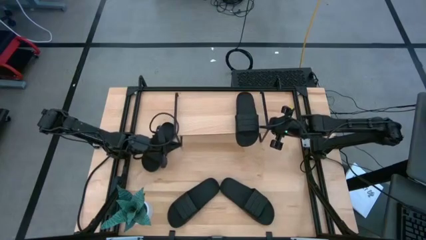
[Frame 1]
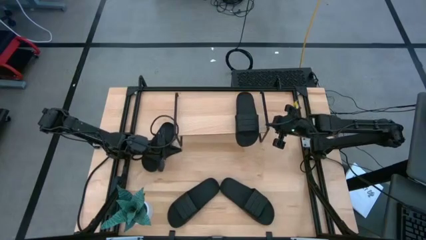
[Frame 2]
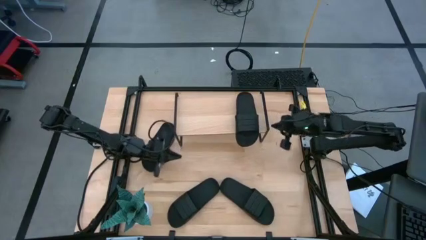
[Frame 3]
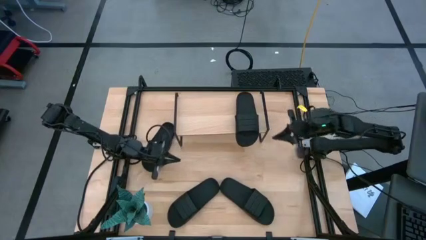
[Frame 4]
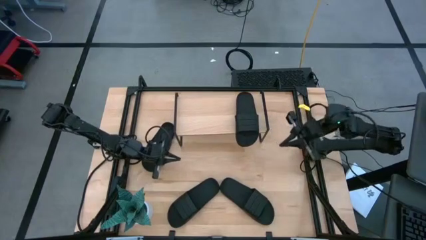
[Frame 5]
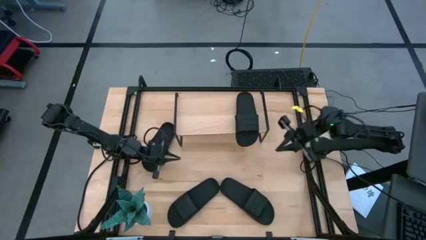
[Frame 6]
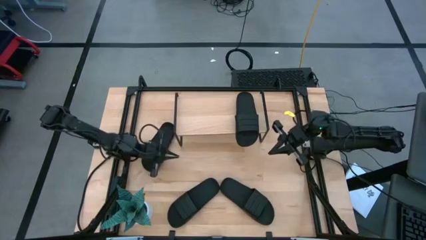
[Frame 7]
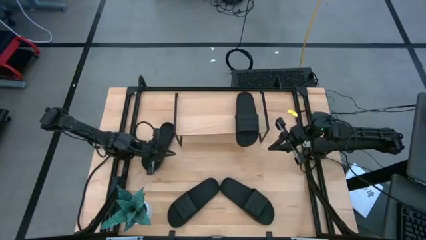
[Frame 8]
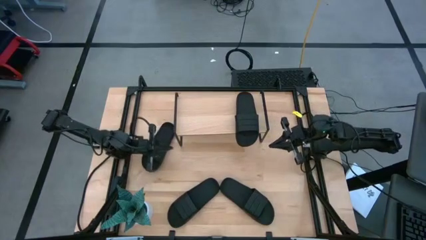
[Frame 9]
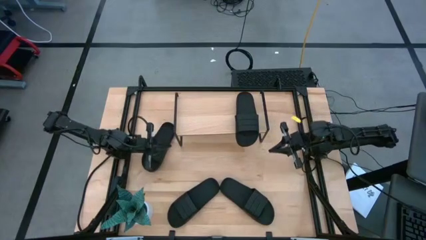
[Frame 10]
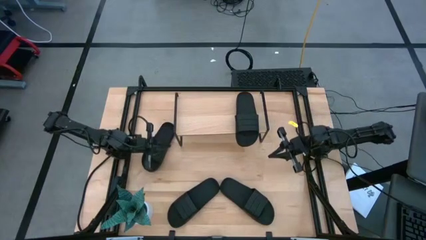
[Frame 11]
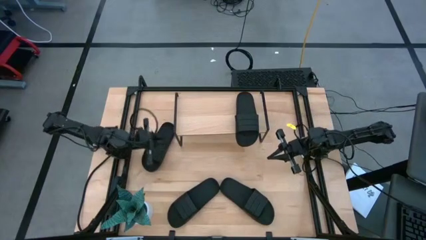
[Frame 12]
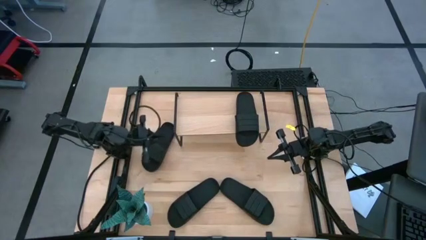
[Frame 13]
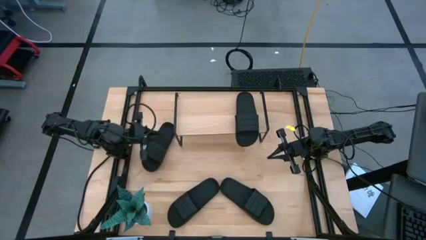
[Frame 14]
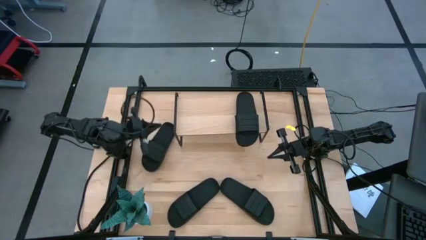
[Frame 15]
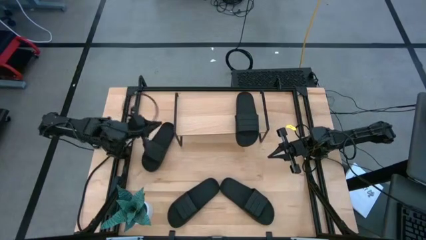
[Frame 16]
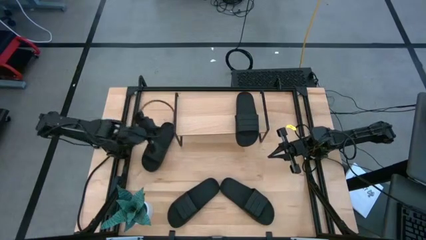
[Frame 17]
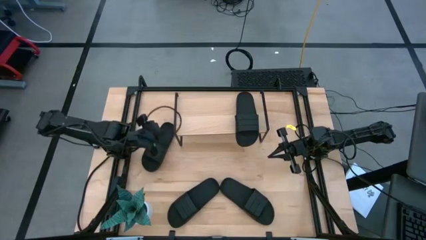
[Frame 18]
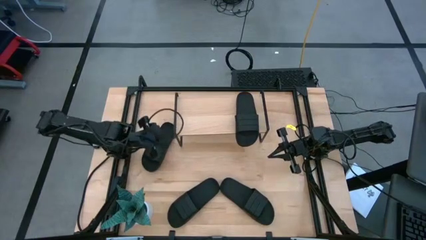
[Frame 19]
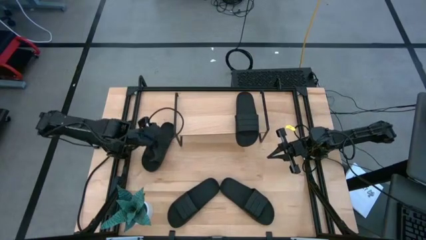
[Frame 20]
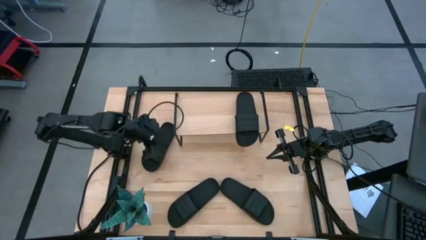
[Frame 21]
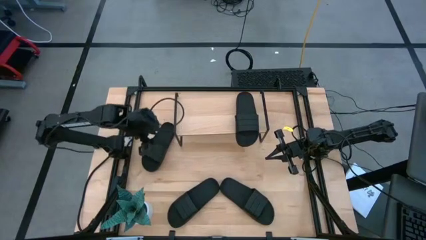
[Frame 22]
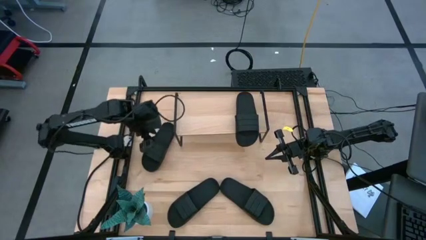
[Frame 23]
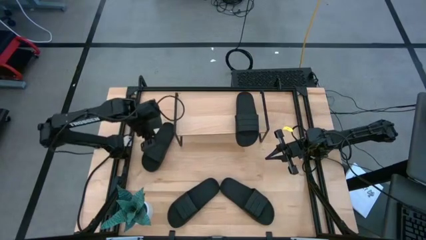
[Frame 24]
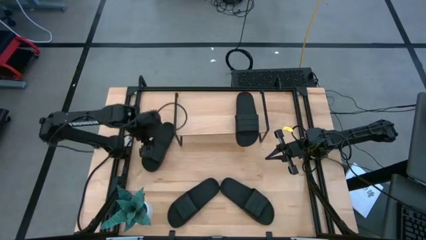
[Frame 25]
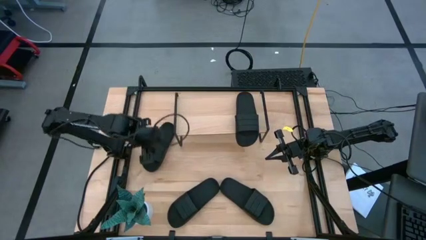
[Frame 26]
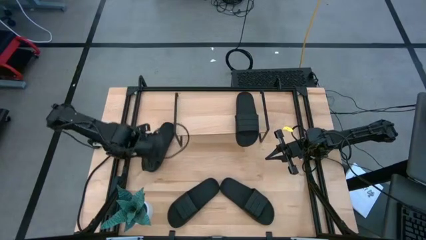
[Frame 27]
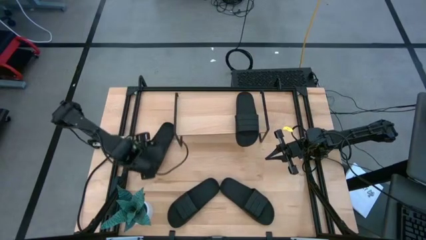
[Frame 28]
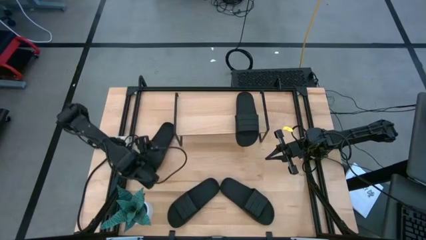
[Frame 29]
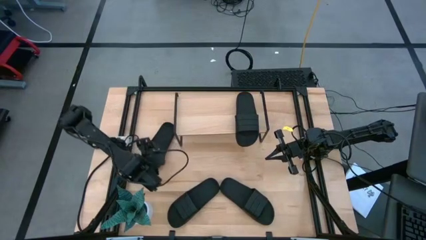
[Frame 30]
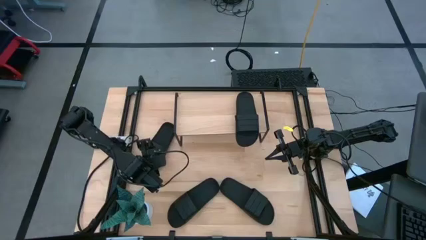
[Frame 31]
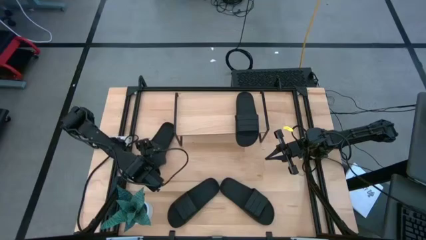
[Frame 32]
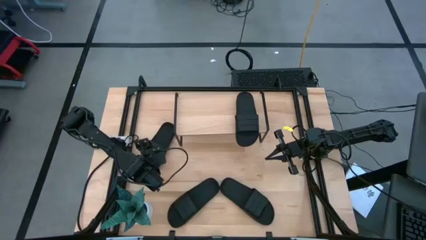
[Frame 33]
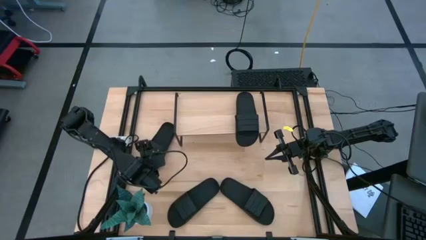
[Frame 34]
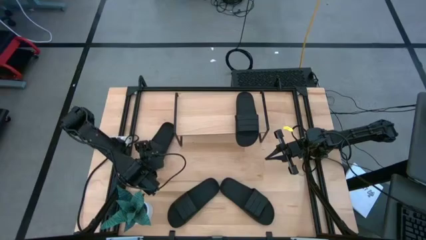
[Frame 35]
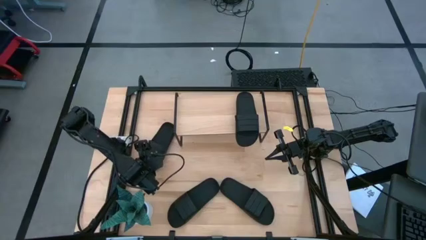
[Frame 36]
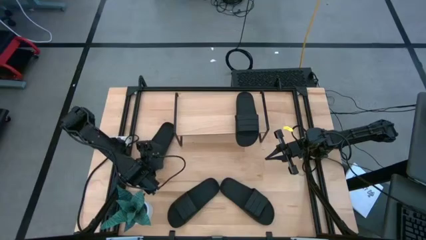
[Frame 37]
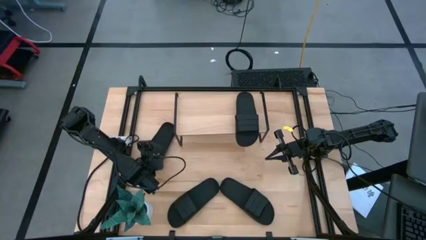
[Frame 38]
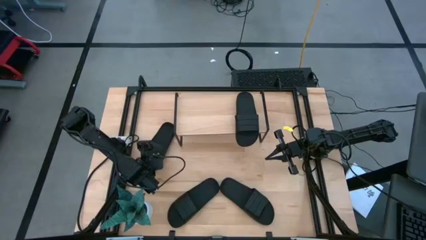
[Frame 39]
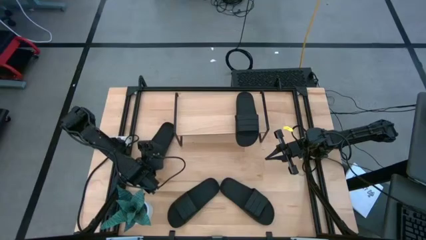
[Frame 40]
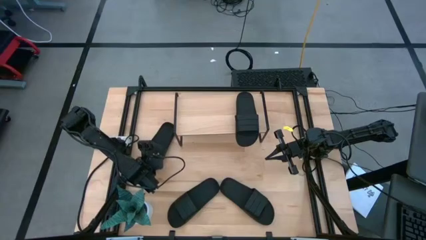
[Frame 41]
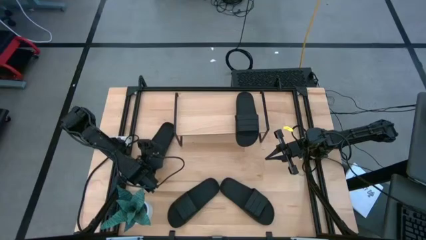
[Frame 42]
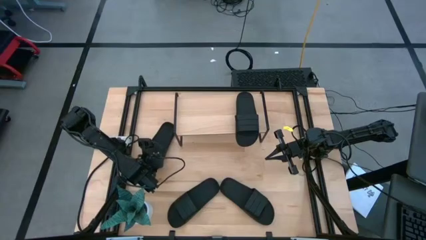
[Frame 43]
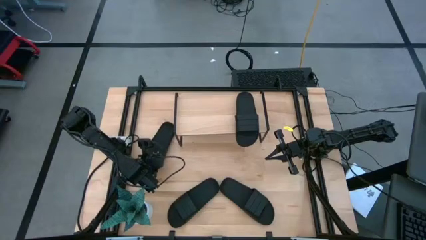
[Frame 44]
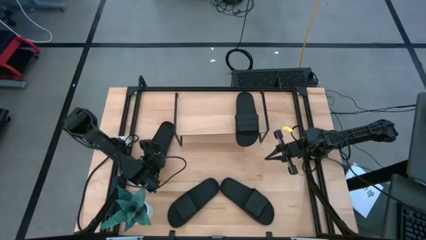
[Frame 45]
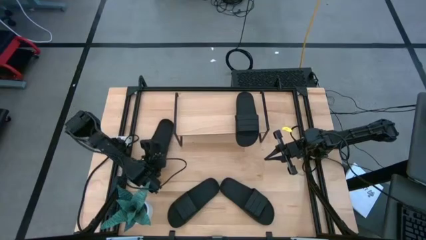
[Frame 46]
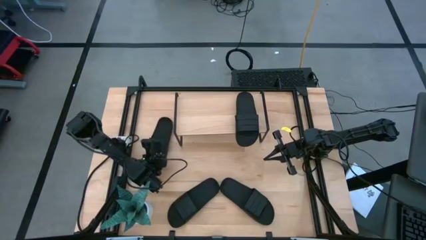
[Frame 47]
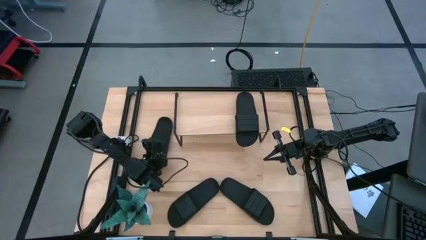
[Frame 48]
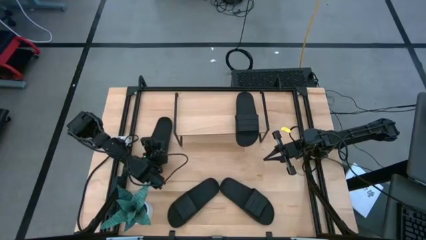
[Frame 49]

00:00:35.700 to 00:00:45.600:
Task: Pick and place slides into the shelf
Put the top left black slide on the shelf
